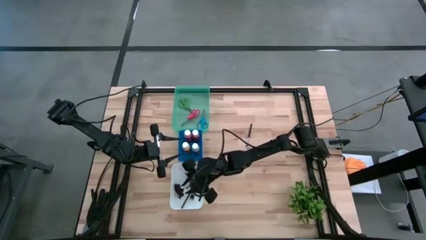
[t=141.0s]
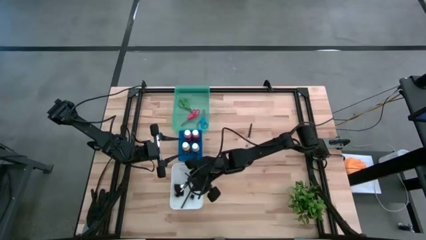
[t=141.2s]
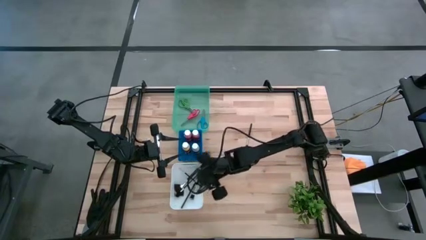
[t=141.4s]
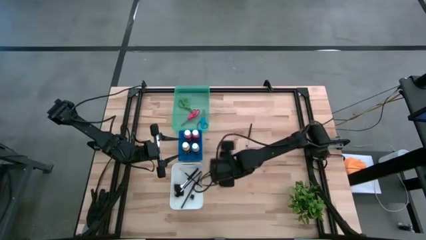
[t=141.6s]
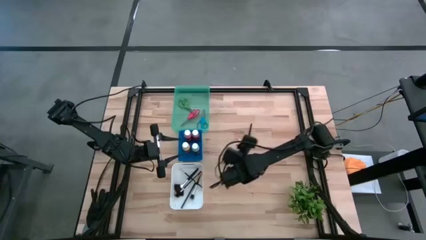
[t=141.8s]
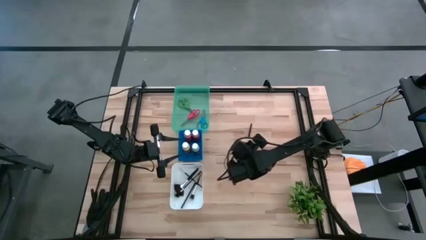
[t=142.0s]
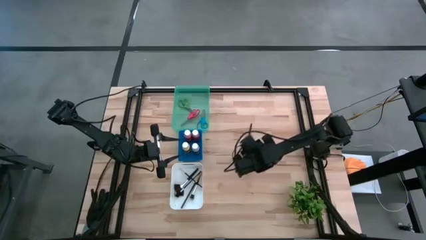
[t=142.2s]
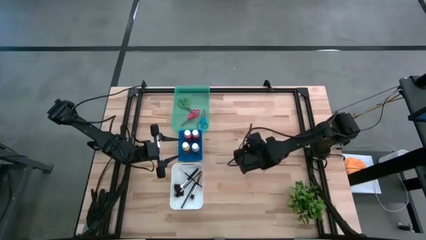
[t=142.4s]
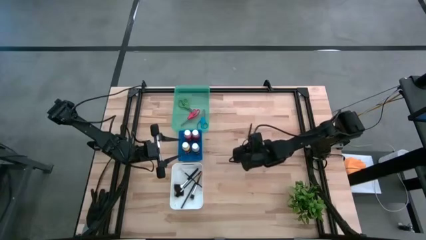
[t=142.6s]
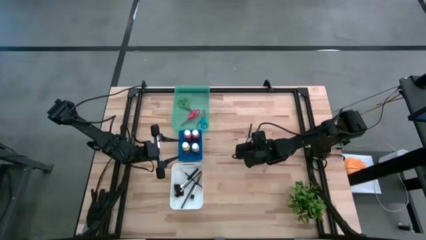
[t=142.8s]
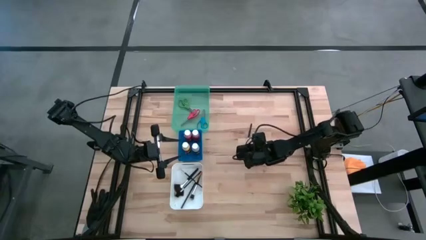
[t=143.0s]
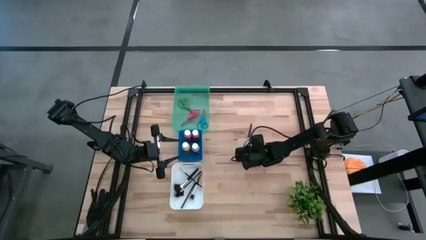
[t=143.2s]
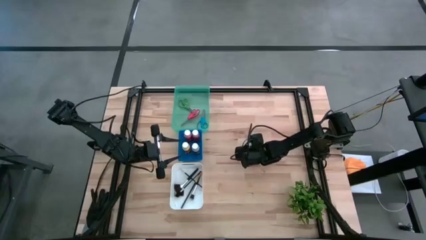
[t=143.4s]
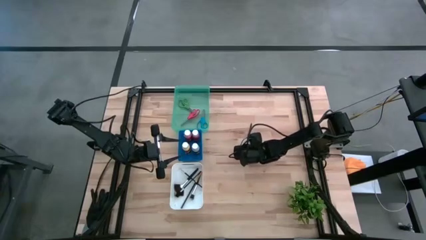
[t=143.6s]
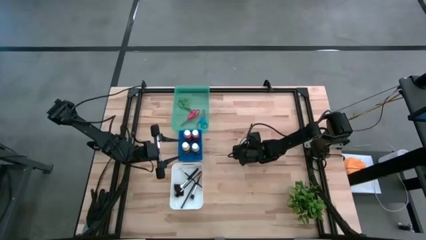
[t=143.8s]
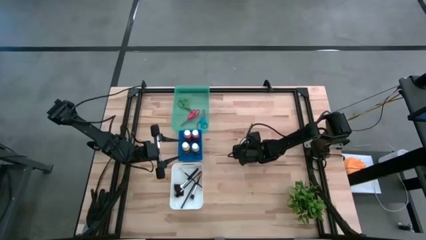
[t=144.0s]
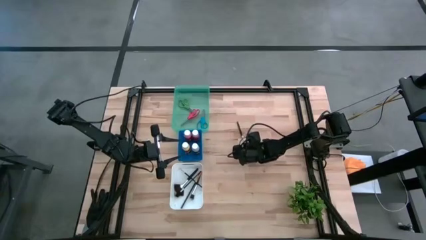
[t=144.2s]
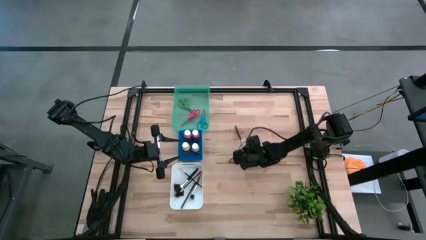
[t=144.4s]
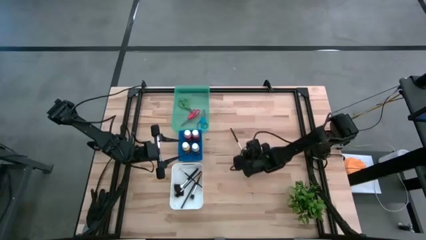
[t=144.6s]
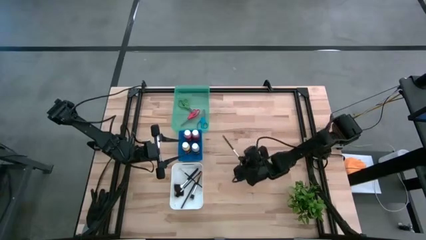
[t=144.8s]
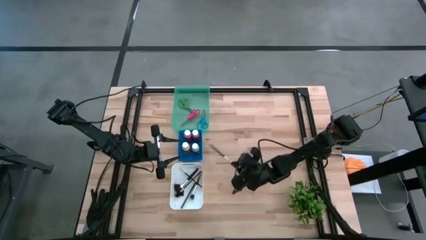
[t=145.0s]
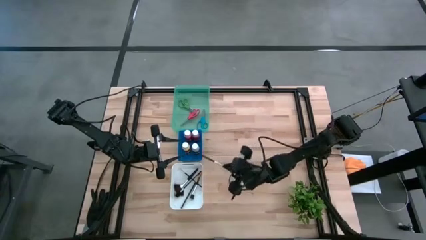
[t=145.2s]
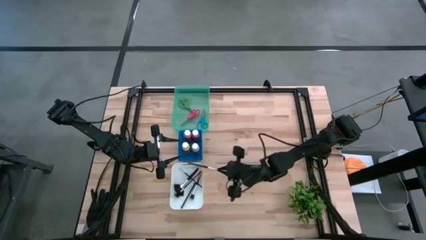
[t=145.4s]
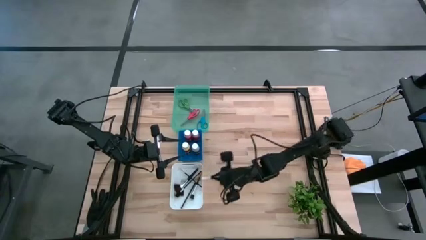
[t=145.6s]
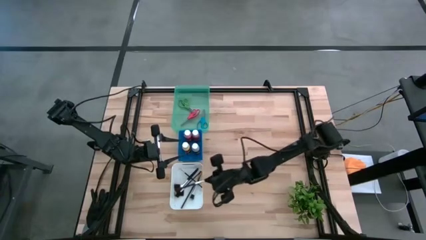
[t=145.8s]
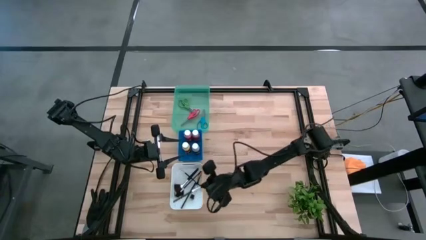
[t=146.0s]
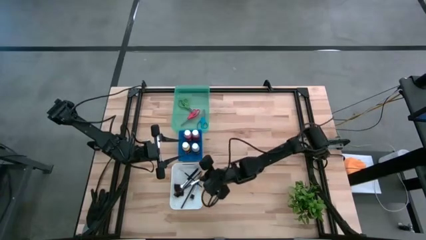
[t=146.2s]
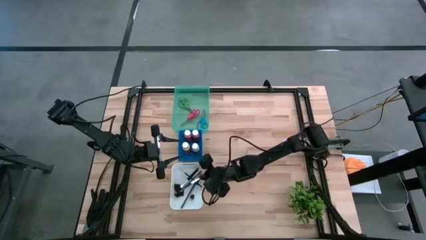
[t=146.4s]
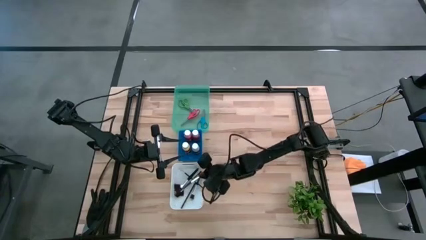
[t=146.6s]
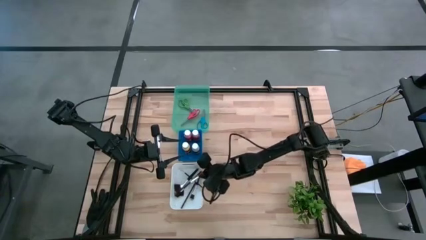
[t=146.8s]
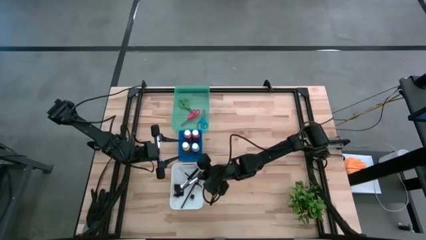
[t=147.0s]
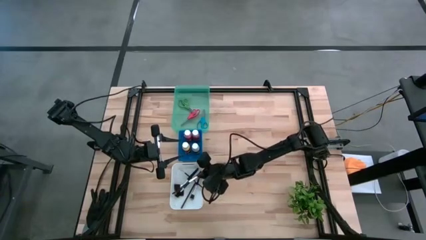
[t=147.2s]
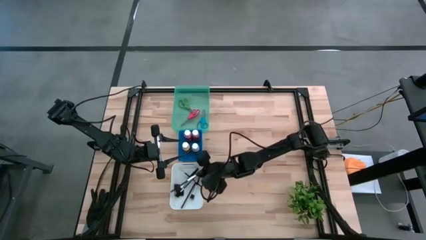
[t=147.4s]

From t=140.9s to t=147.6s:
Task: Pick & Place Paint Supplies
Put the black eyeshadow brush into the white bin

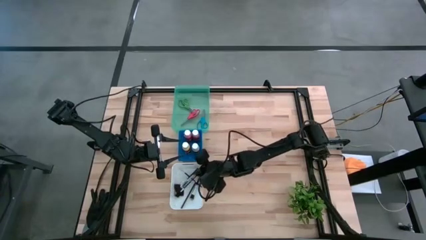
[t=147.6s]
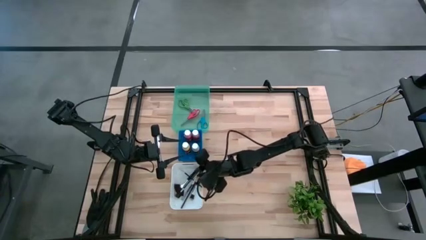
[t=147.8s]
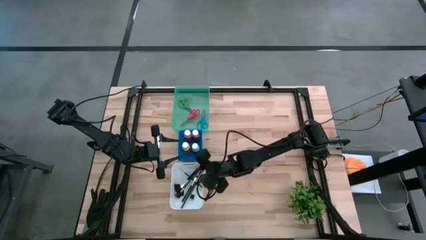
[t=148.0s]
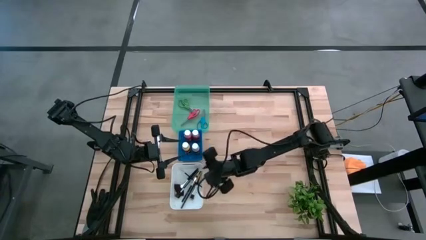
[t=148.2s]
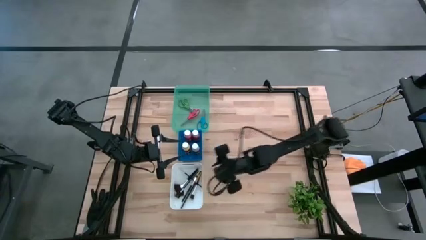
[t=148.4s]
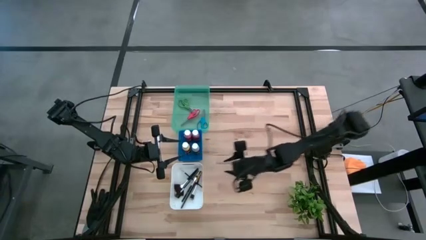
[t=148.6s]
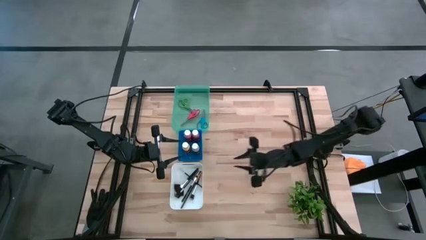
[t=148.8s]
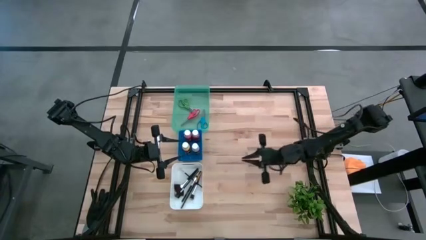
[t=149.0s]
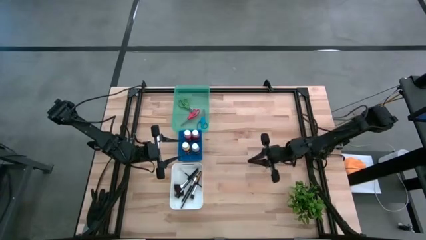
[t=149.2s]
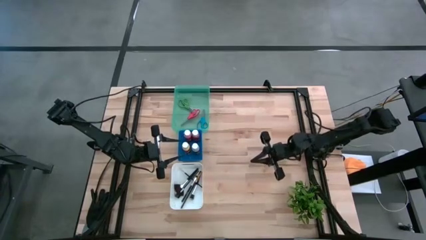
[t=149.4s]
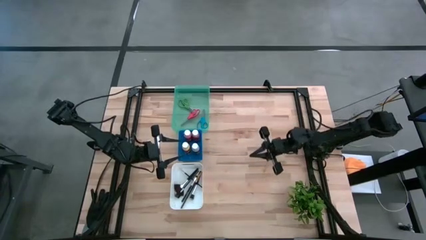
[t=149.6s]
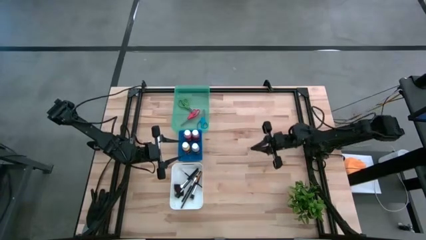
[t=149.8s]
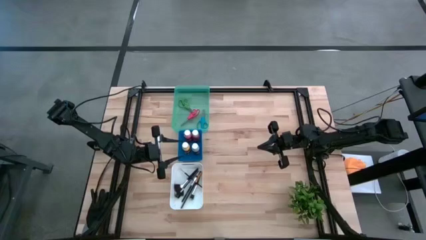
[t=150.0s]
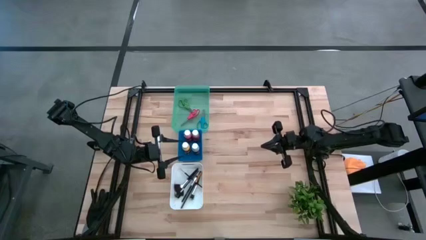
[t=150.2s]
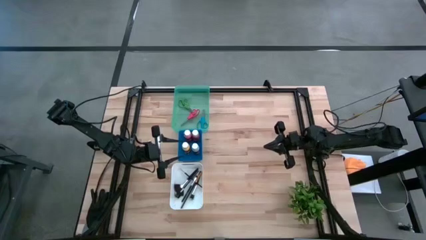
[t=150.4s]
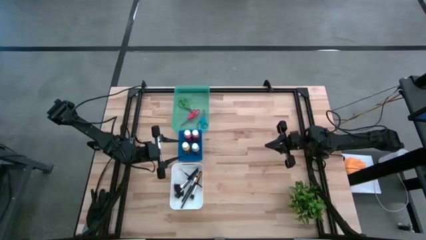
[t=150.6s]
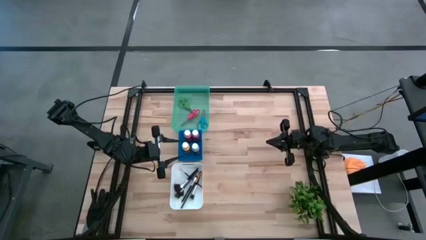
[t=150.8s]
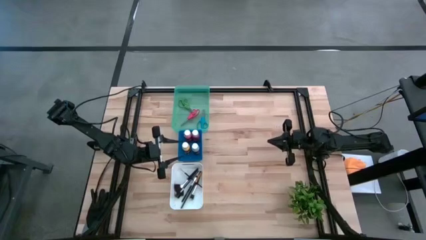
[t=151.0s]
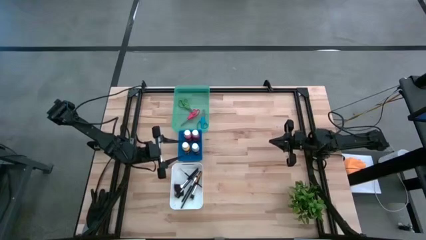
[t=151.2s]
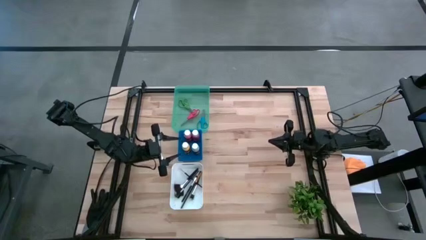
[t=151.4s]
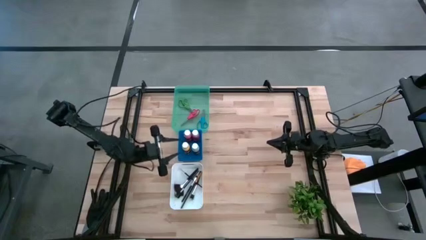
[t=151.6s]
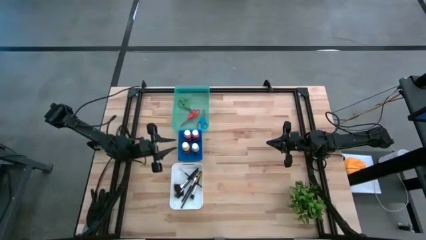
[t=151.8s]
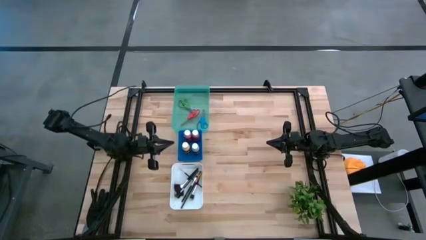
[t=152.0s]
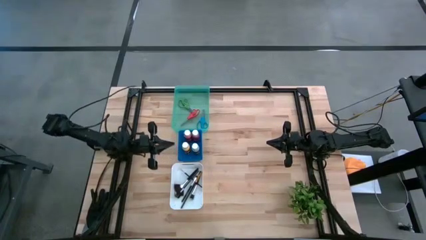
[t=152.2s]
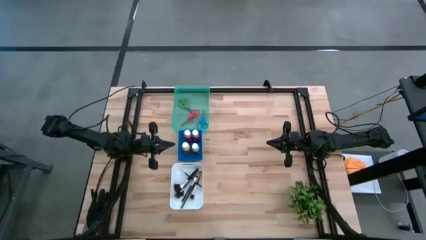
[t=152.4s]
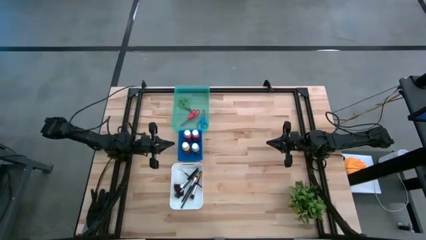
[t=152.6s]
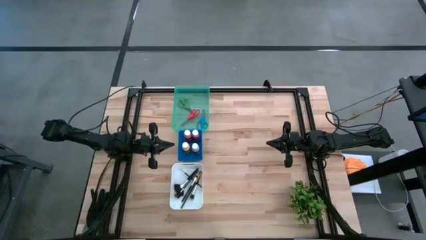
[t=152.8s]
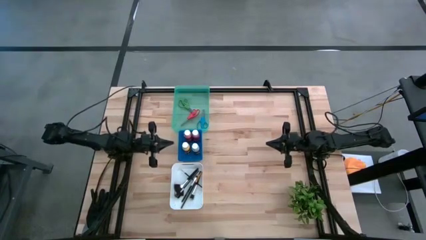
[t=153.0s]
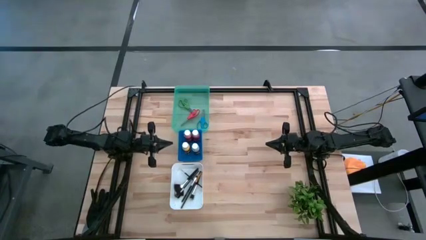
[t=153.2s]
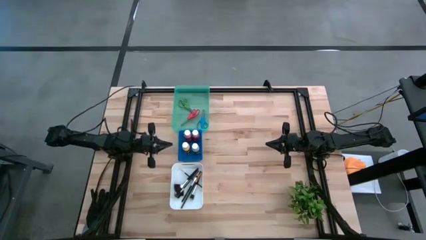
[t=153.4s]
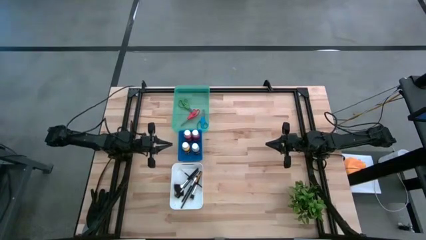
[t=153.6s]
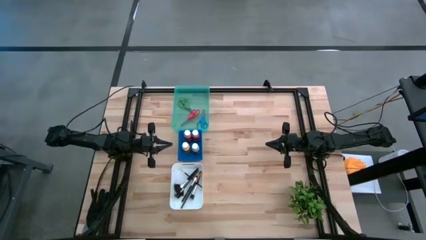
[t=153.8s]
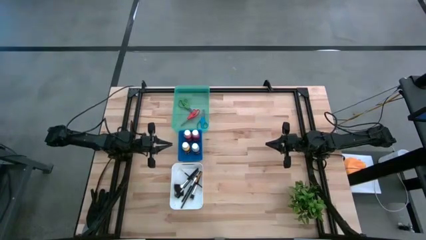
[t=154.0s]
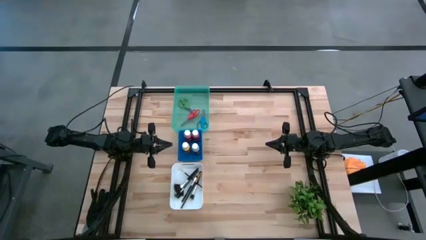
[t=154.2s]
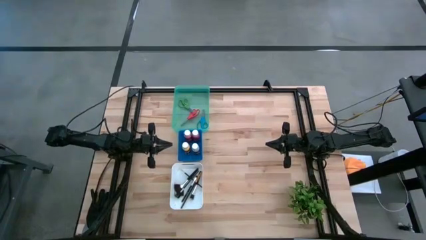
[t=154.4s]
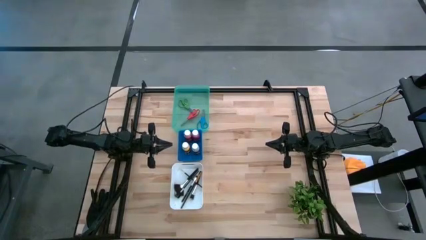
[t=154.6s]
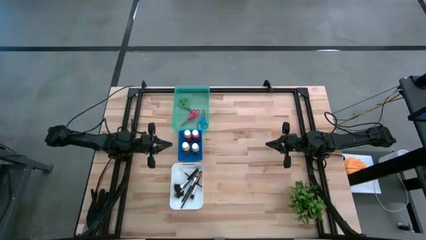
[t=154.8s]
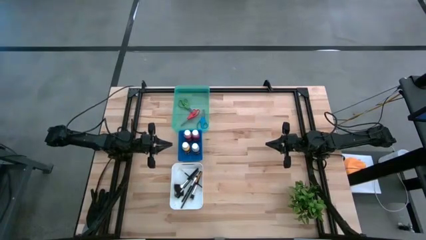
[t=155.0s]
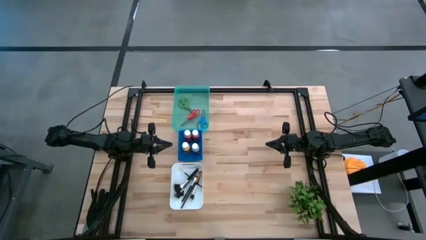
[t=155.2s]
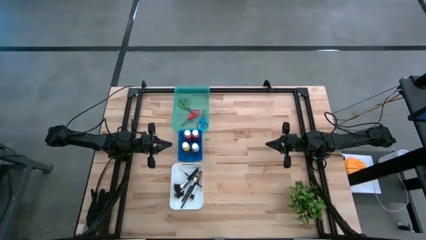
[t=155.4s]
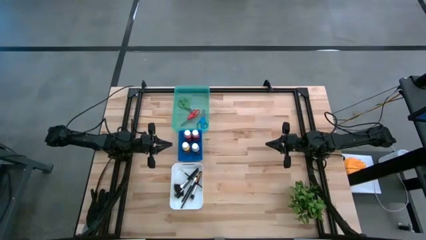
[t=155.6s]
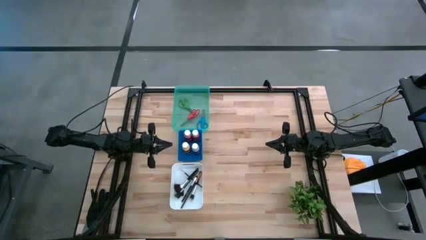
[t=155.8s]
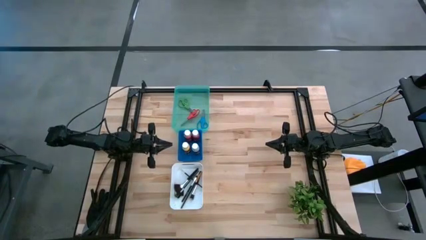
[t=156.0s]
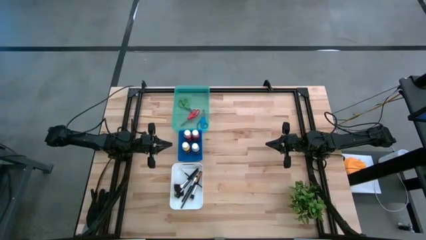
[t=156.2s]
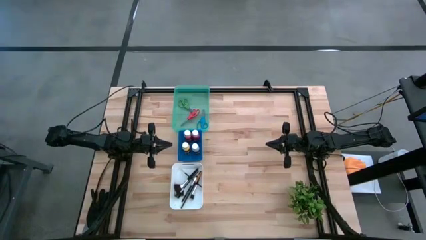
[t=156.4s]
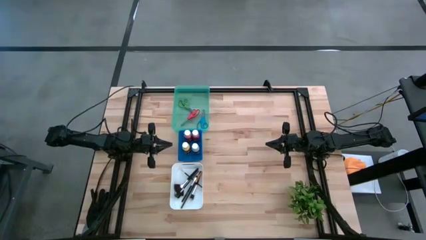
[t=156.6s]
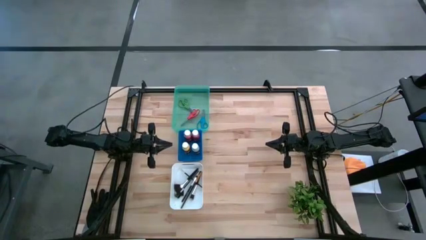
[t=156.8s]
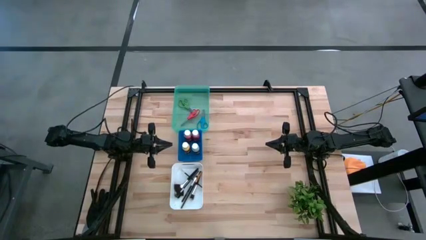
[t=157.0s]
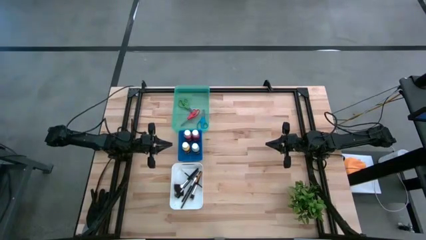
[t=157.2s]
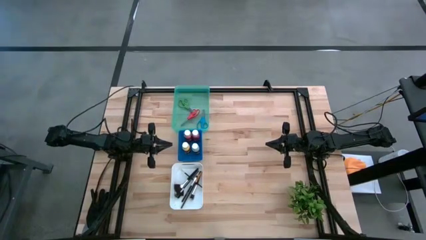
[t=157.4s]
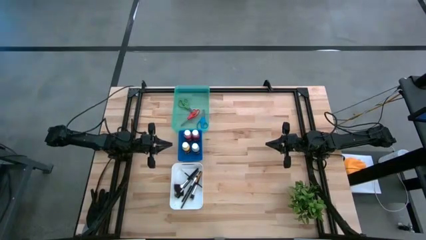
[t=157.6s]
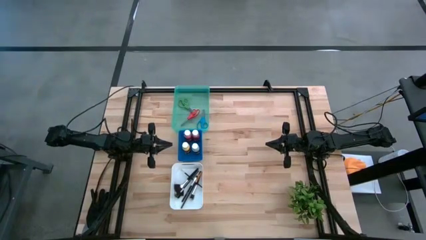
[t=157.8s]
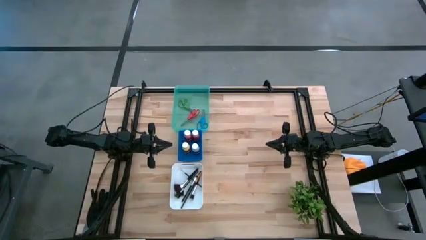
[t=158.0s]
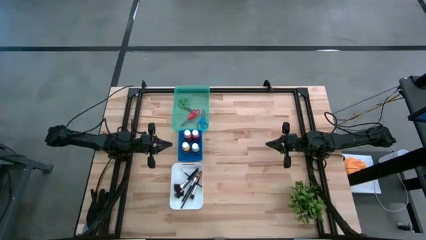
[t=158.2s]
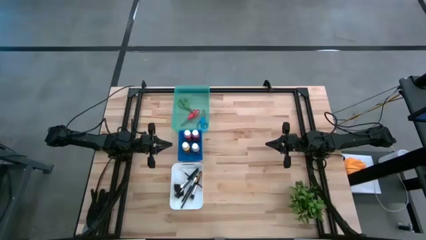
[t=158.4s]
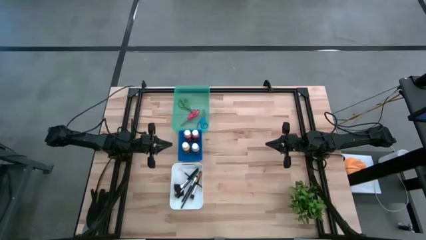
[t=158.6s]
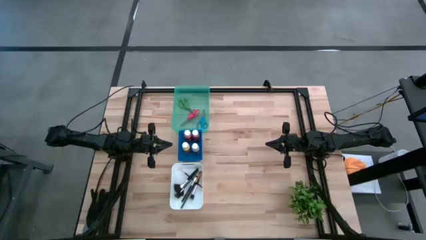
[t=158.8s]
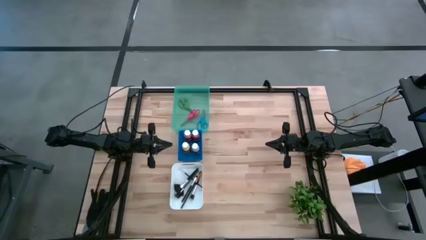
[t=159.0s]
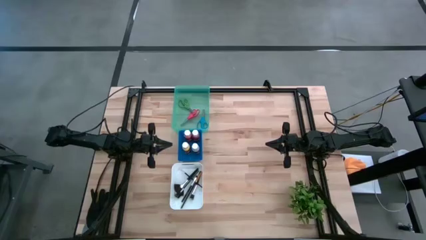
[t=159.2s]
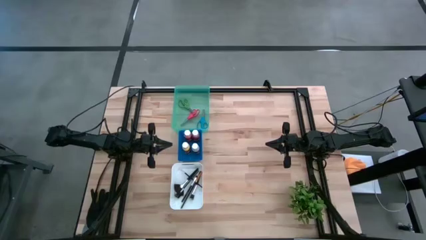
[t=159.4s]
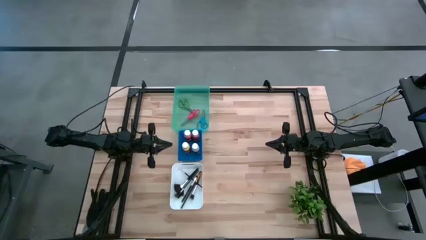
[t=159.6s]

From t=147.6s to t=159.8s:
Return to Home Position
